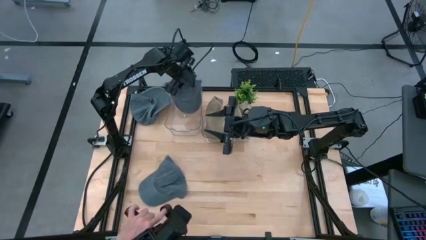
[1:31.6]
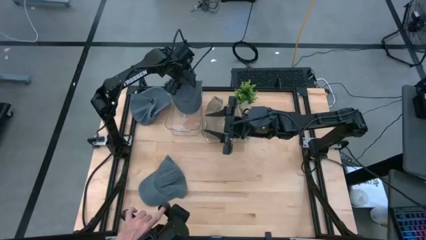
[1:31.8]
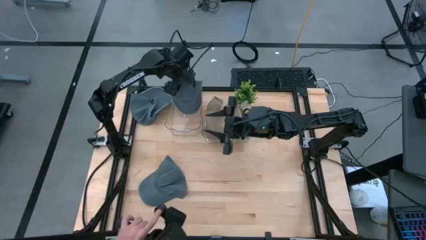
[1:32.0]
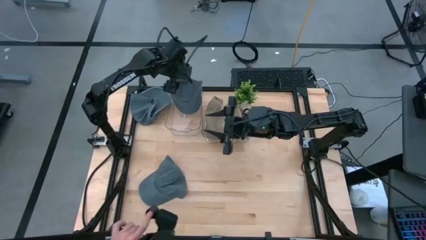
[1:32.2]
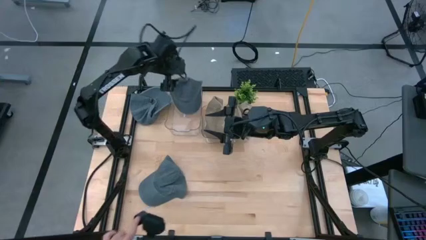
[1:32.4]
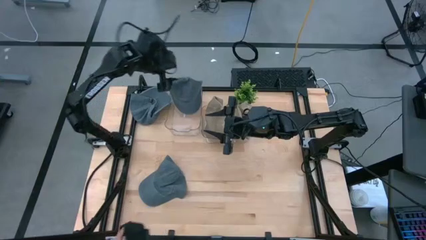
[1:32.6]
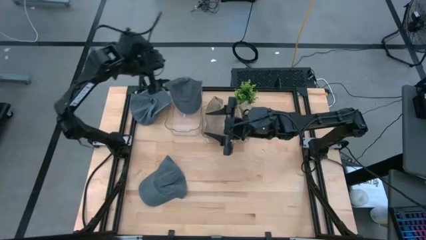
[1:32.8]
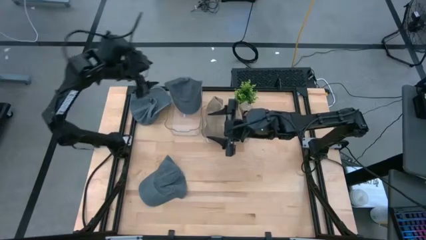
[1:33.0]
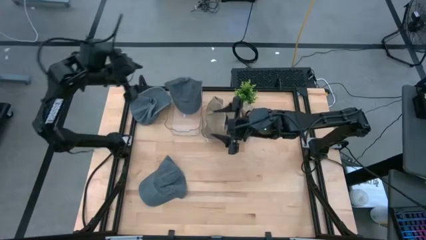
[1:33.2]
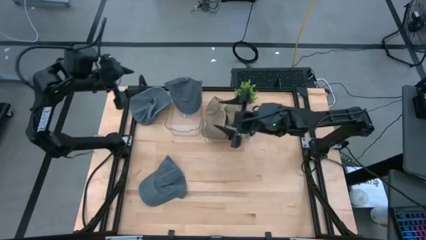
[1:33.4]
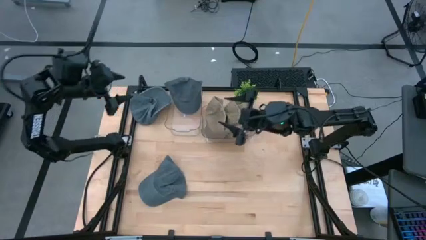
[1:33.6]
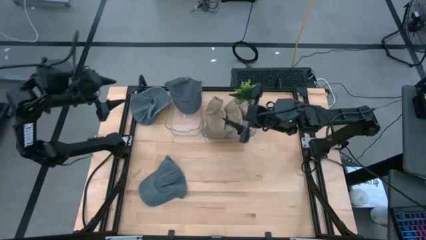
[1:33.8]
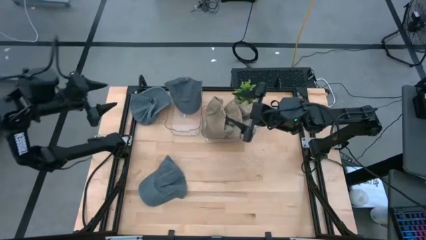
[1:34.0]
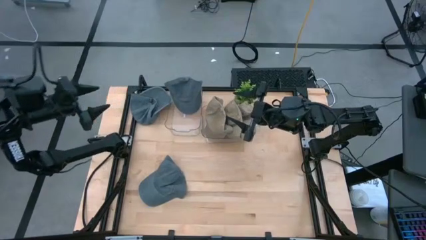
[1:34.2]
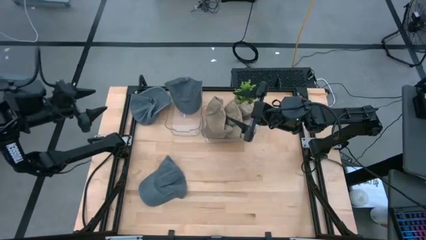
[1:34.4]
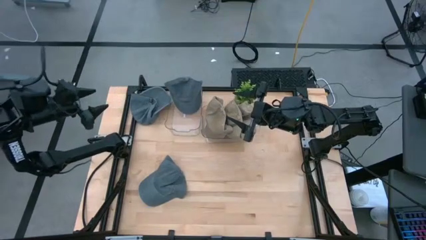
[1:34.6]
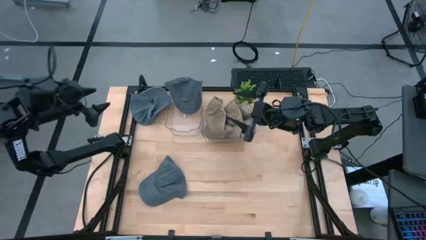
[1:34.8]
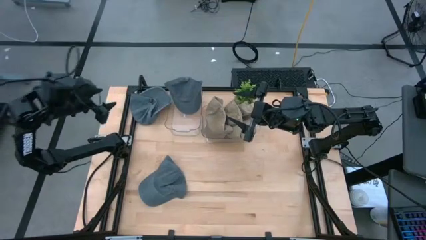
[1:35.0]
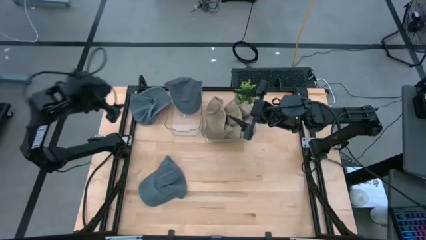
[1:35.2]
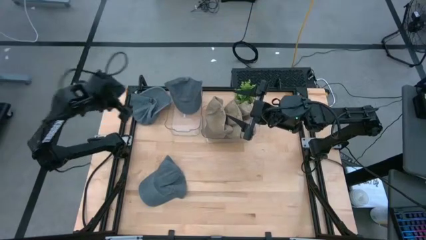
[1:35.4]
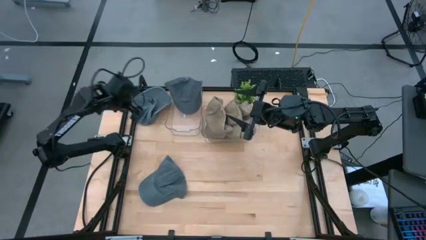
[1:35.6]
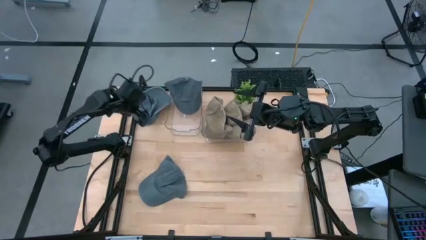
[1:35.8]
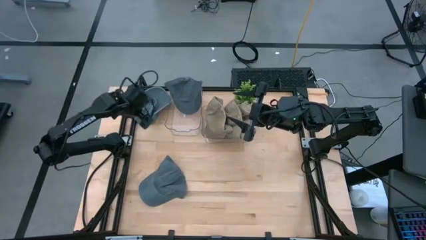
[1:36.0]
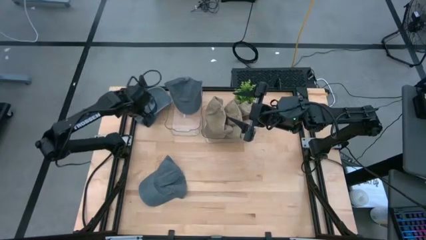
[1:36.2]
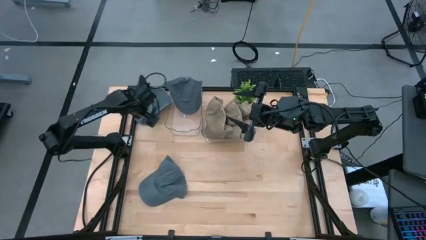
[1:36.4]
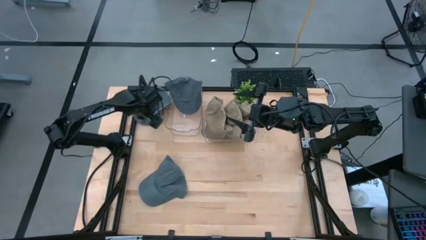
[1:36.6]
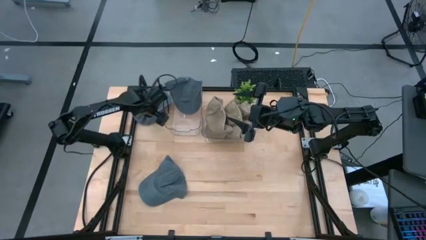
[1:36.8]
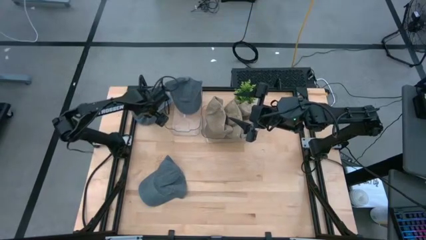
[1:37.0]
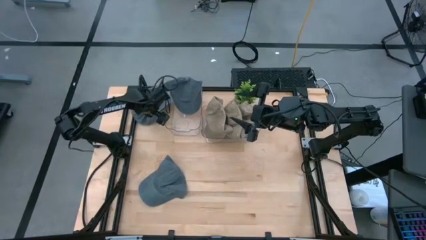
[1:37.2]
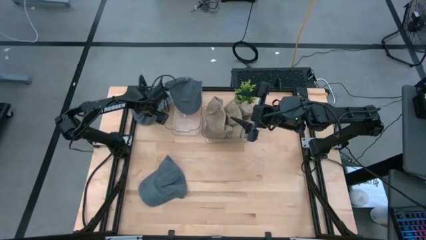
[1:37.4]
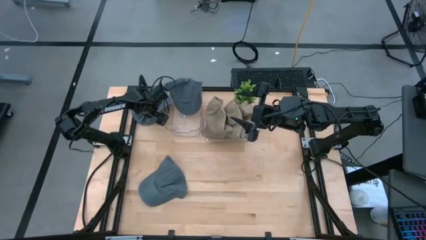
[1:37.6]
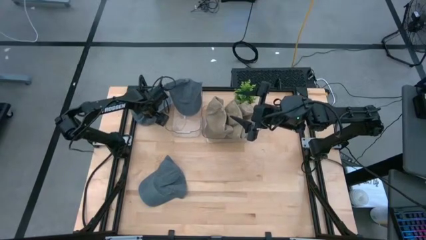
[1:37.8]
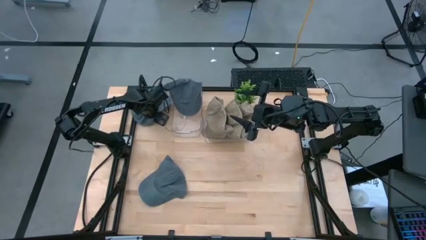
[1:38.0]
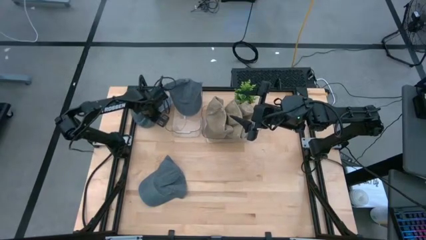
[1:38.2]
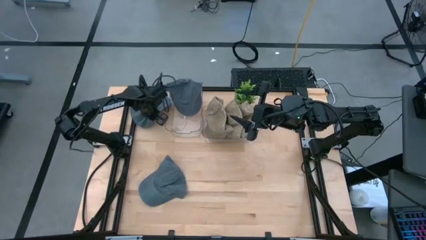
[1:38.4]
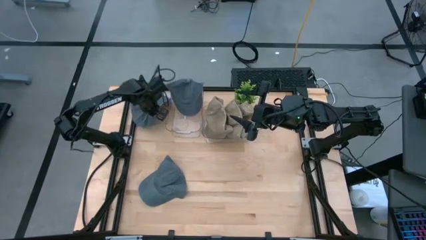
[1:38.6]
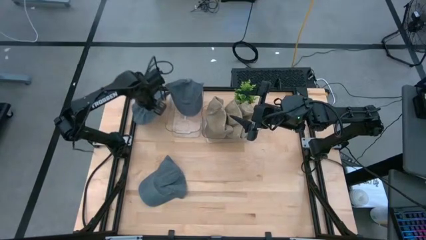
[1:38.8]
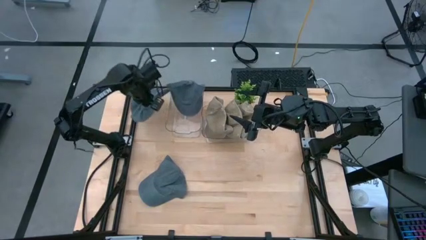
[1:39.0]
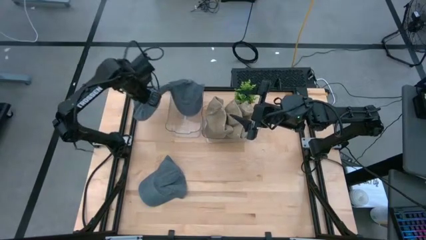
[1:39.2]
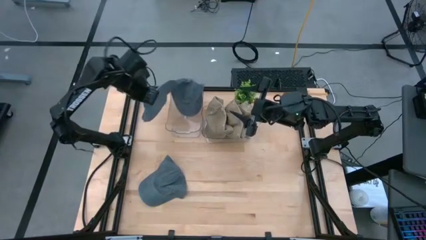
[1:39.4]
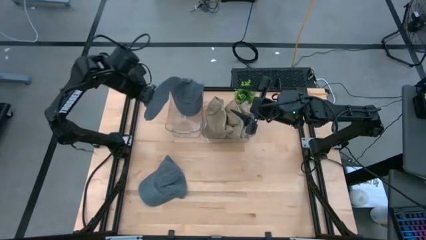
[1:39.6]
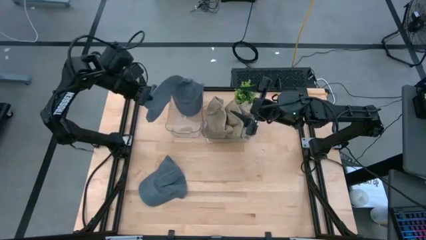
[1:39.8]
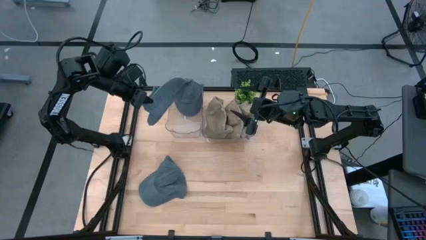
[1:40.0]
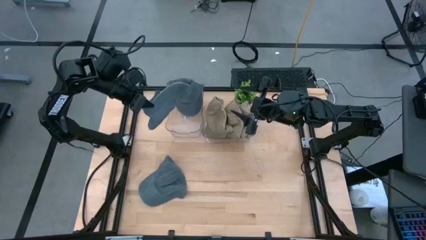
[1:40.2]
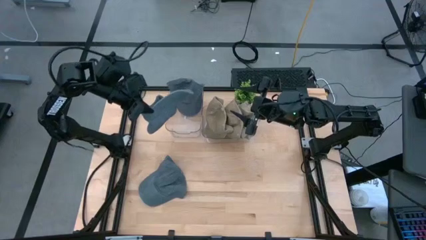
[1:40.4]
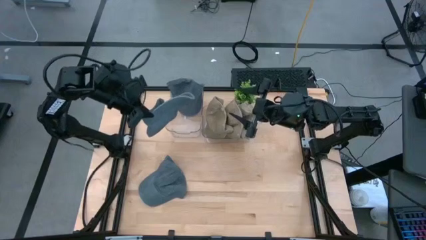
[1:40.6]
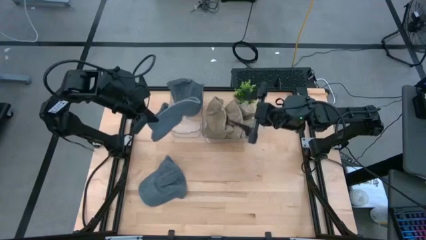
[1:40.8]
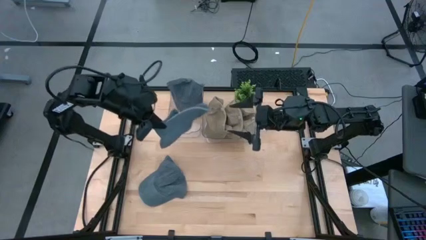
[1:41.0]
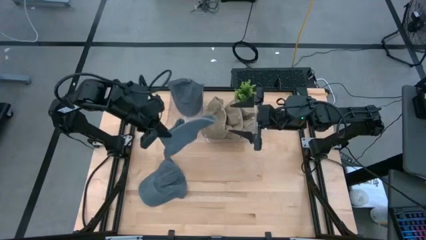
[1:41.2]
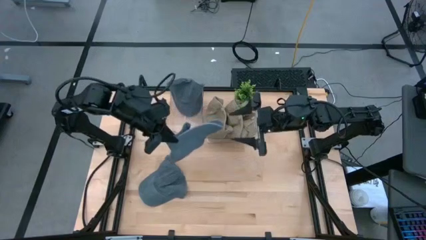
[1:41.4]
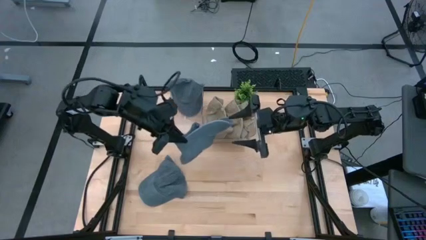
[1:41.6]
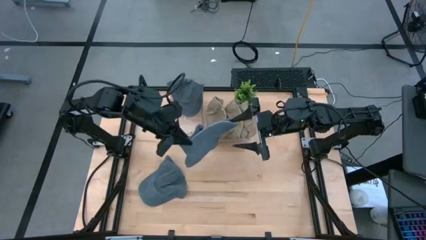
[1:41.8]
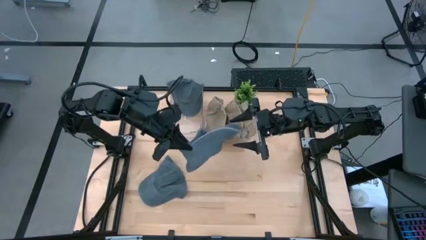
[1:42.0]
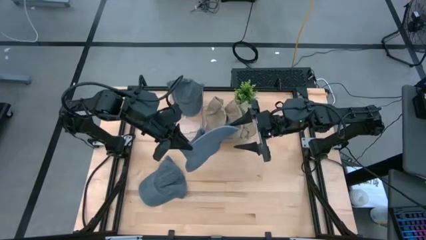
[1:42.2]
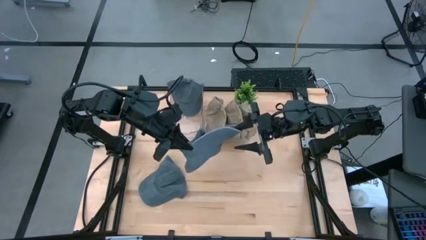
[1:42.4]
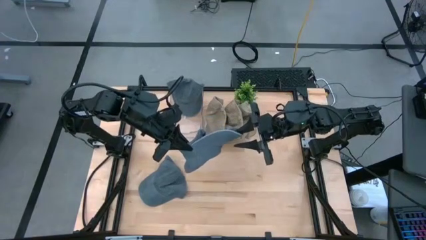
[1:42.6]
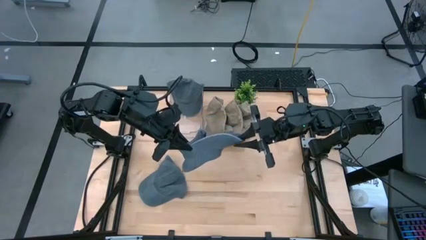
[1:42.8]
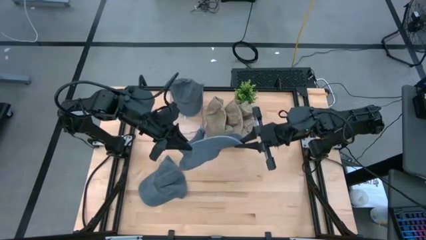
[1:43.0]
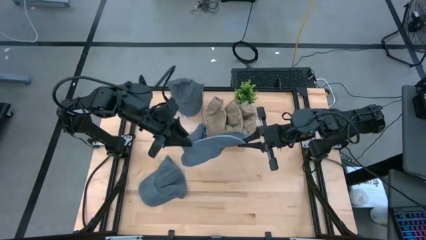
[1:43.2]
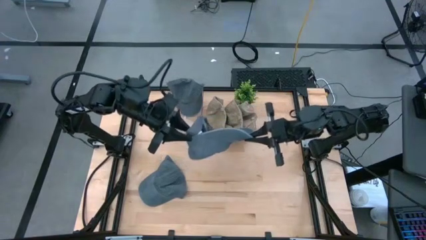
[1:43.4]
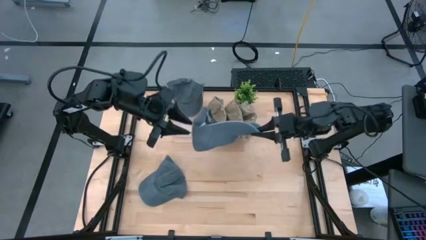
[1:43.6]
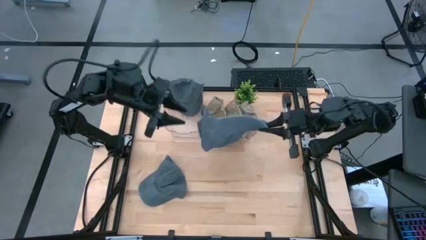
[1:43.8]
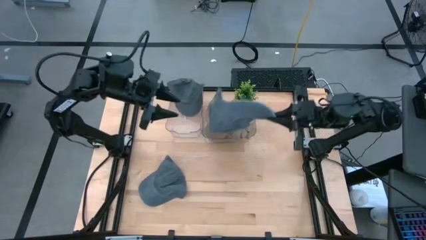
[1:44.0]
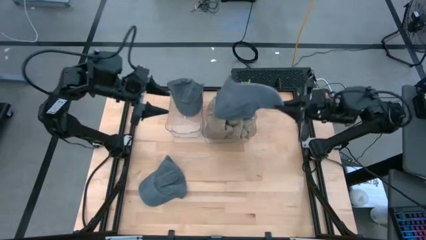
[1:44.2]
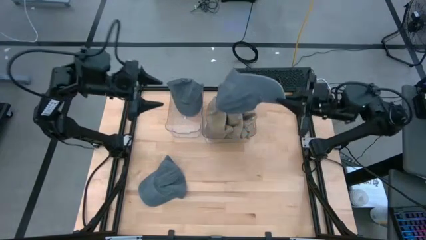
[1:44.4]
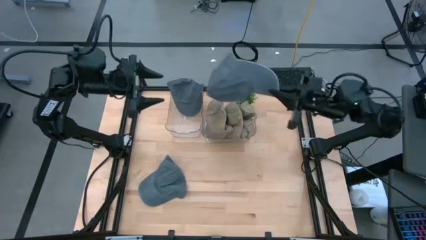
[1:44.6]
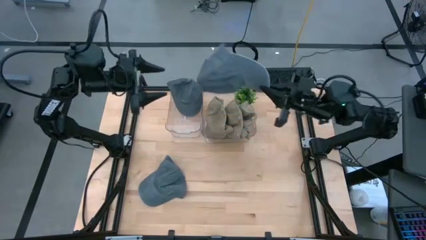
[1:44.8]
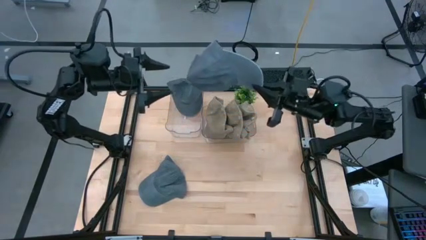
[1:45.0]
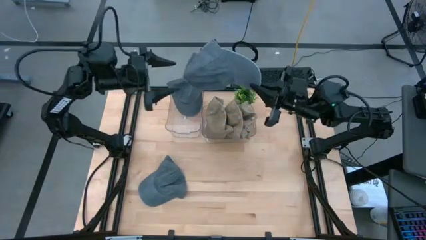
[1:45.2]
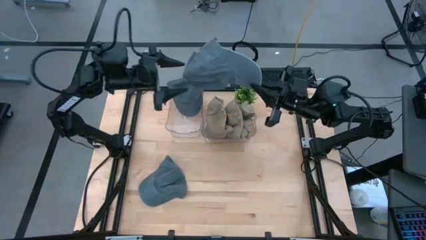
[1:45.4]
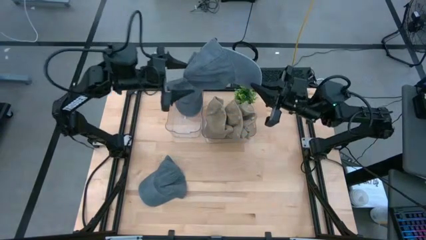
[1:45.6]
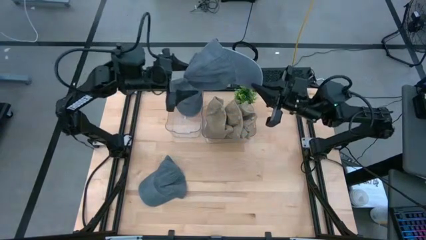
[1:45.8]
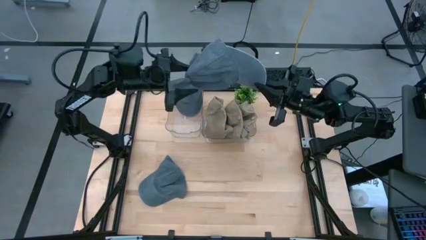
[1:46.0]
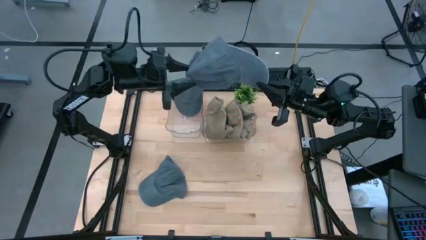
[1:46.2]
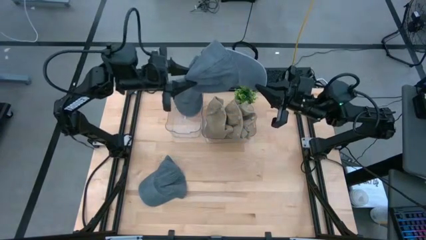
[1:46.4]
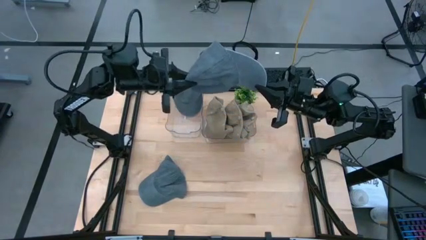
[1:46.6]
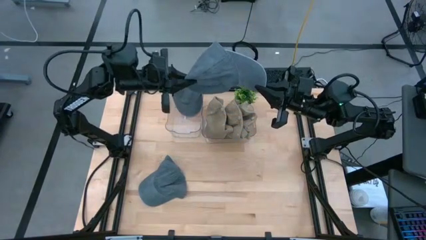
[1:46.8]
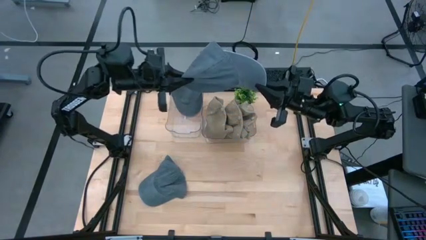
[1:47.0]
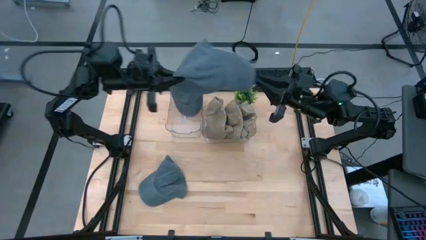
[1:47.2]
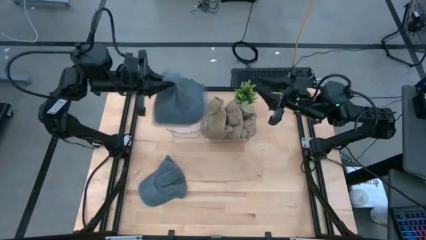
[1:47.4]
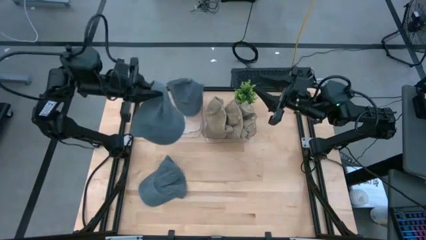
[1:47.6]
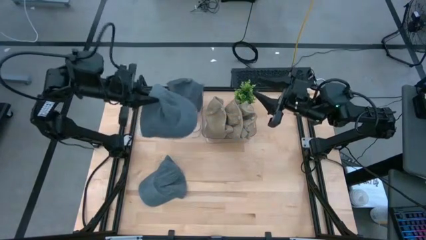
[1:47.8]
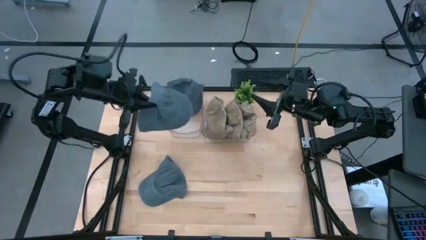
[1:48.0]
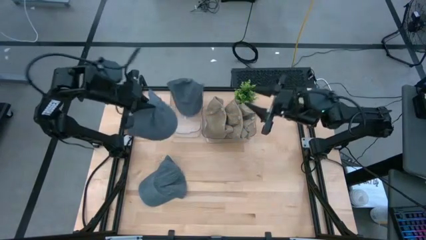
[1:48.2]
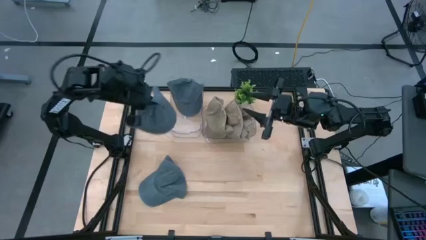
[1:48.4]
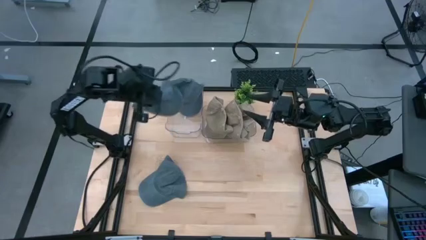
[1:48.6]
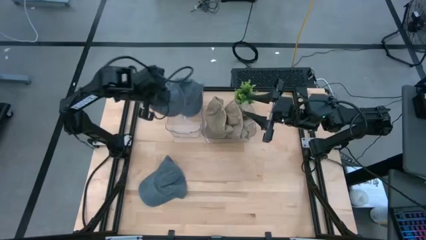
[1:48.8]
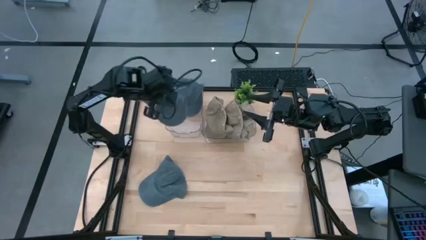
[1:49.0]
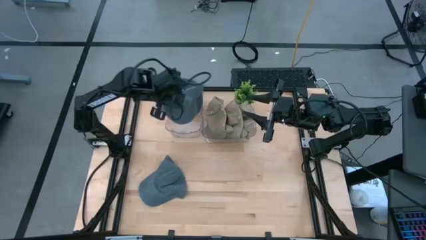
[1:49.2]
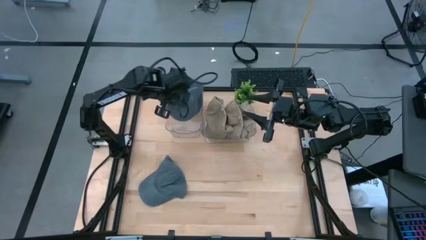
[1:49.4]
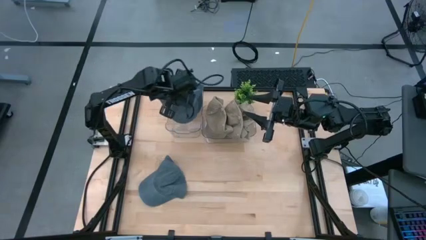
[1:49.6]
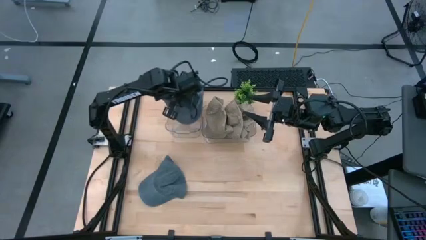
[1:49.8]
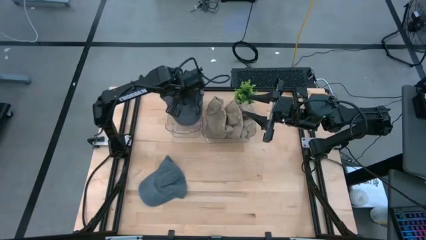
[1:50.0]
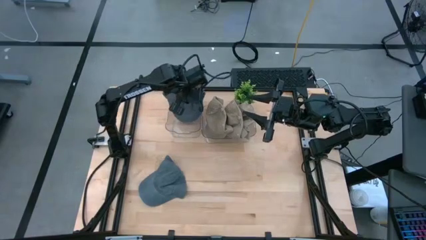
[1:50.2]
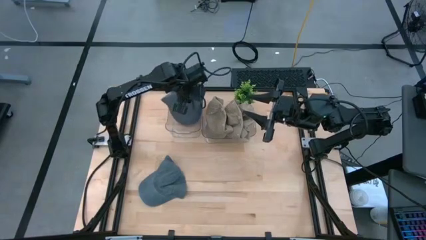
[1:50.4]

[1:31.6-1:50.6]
Task: Pick & Place hat
Put the top blue cap into the left transparent bin
